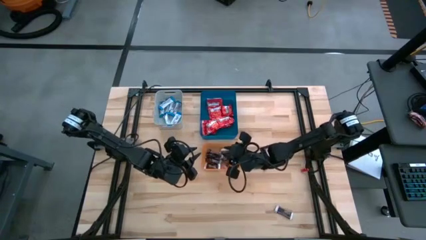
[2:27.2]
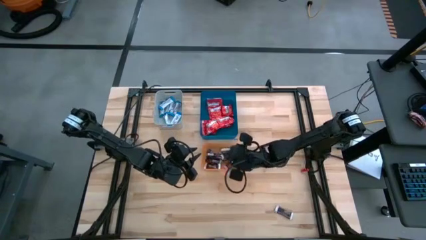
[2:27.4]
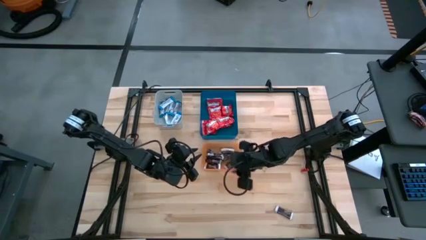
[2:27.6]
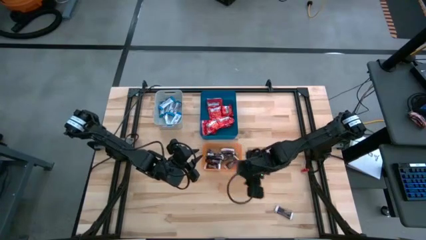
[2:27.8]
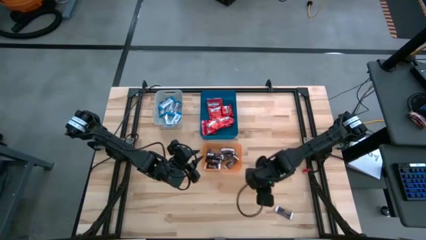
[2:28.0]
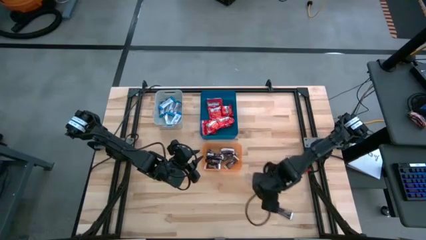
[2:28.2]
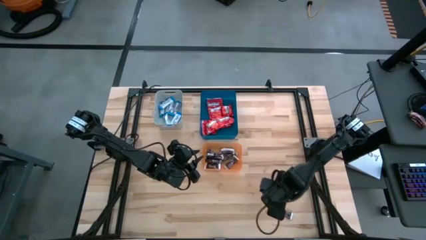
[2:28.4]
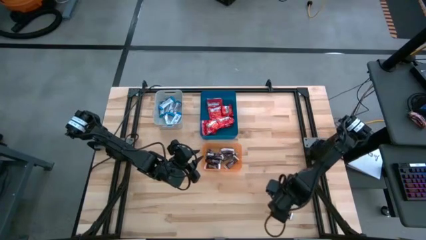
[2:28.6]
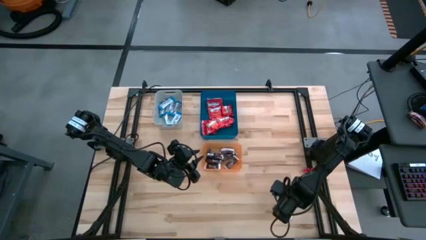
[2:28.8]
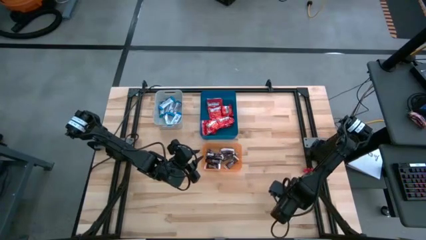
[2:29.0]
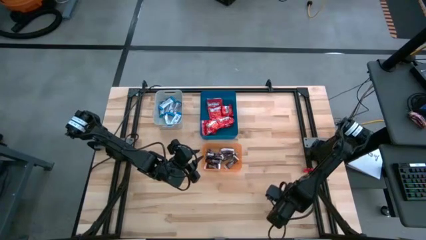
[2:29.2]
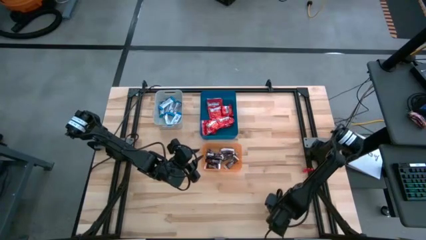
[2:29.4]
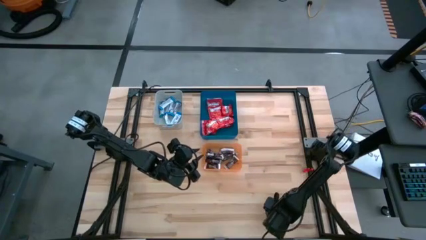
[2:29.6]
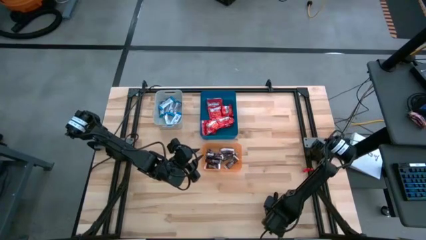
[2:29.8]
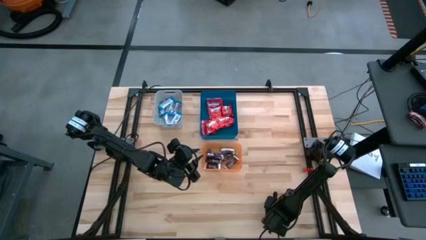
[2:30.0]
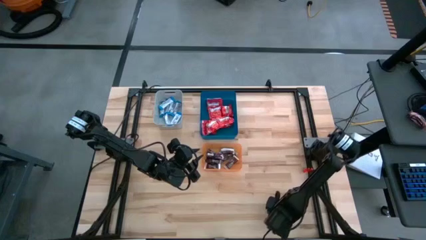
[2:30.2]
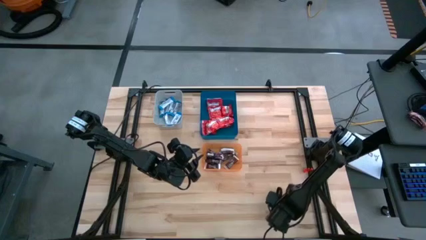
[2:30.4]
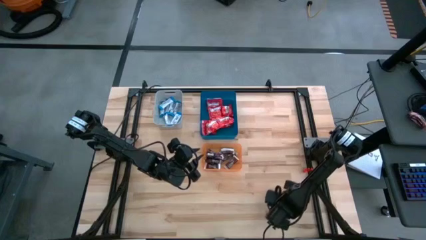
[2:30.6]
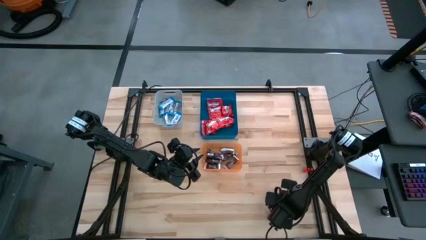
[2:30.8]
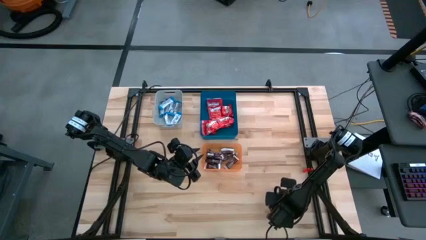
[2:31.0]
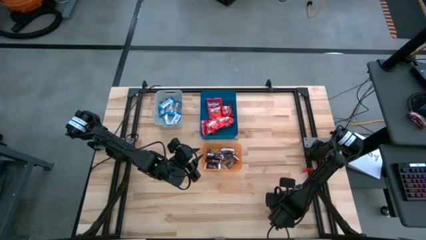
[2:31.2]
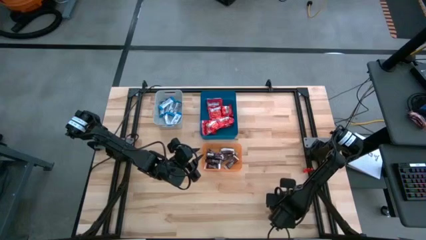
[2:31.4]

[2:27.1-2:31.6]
Task: Sort candy
Put the brown chocolate bar into the orange bin

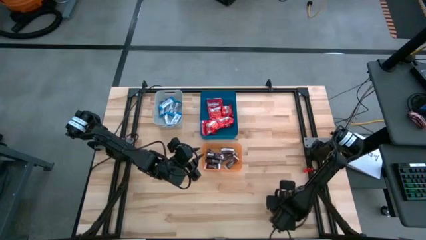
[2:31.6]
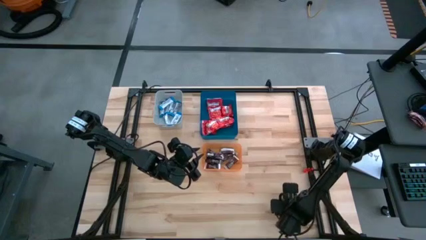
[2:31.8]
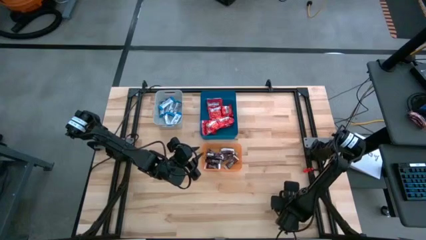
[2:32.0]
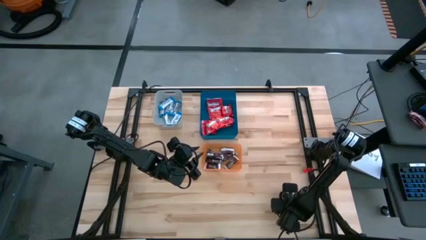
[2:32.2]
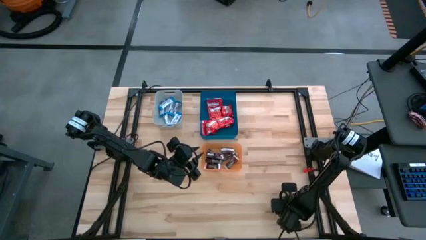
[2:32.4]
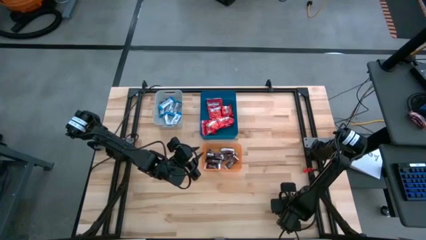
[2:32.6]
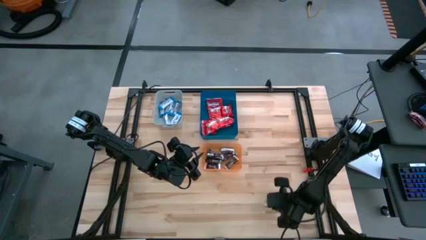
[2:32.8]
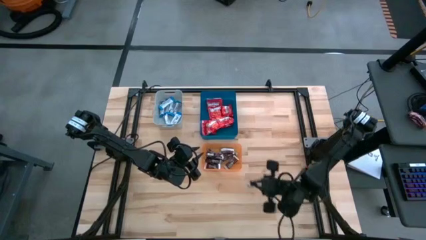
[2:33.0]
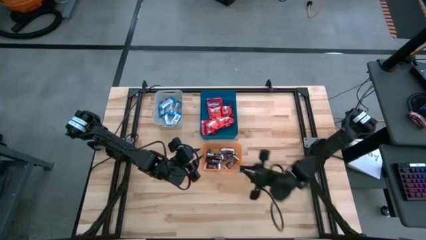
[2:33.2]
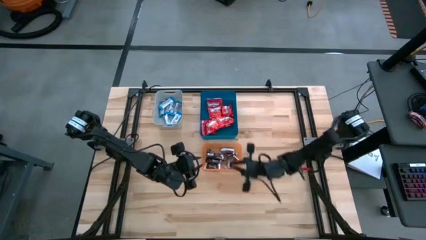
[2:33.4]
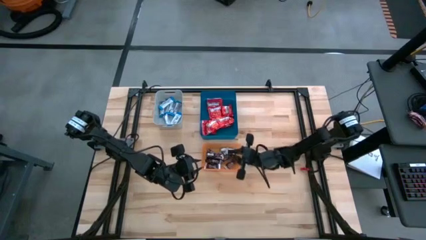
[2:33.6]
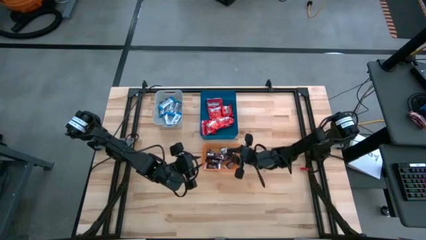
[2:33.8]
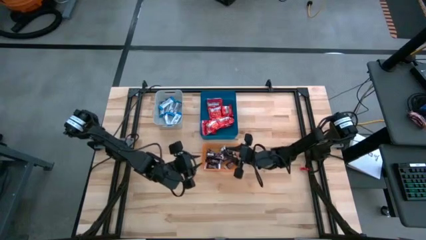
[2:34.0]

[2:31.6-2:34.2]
Put the brown chocolate bar into the orange bin

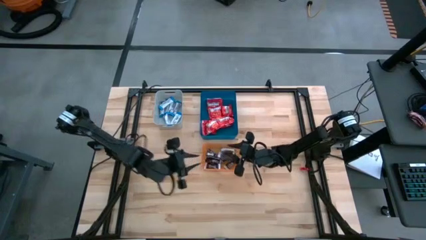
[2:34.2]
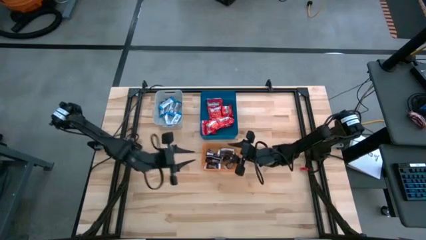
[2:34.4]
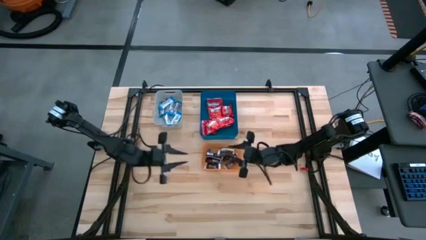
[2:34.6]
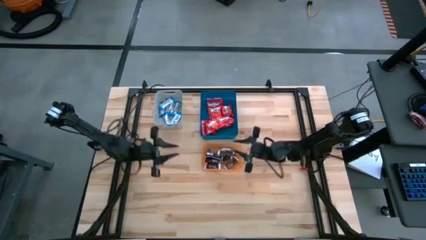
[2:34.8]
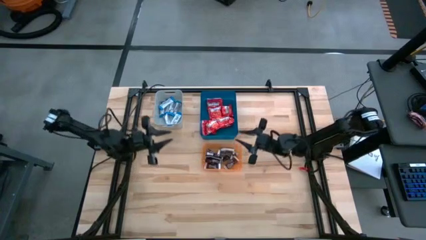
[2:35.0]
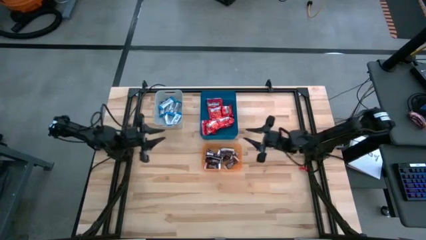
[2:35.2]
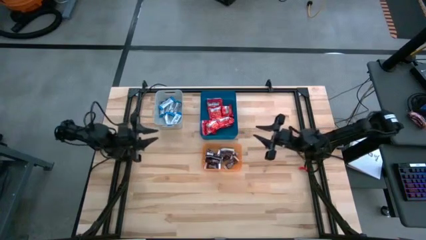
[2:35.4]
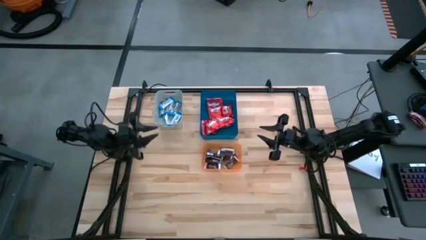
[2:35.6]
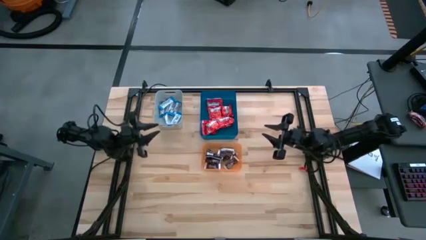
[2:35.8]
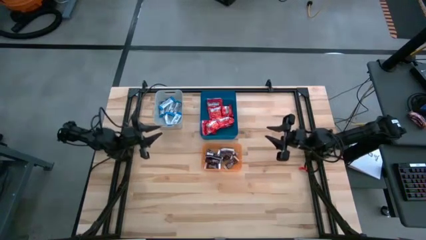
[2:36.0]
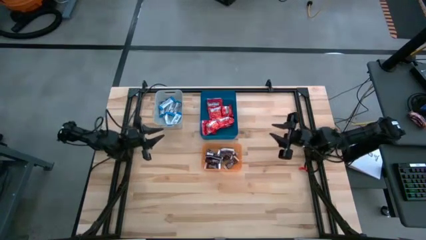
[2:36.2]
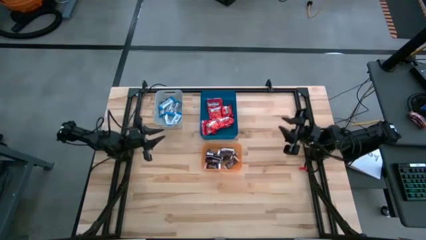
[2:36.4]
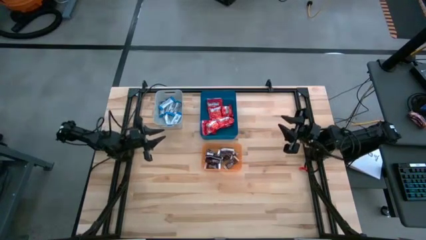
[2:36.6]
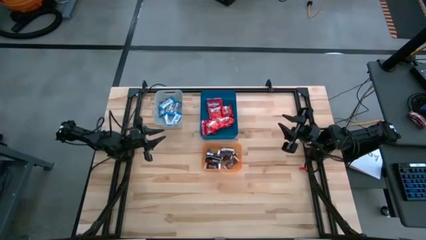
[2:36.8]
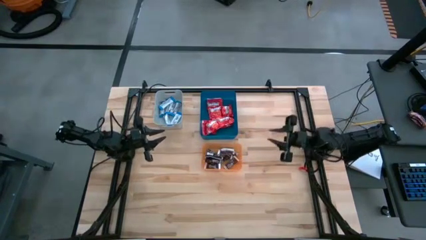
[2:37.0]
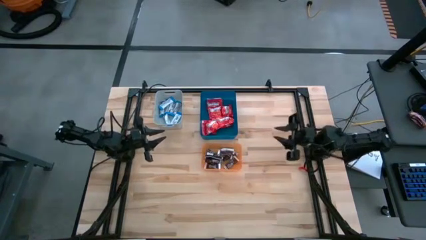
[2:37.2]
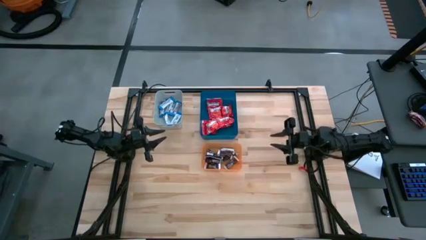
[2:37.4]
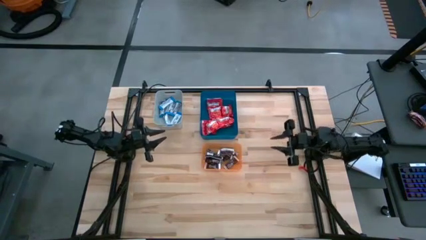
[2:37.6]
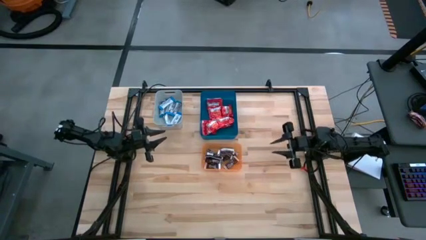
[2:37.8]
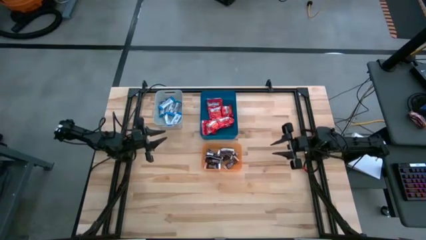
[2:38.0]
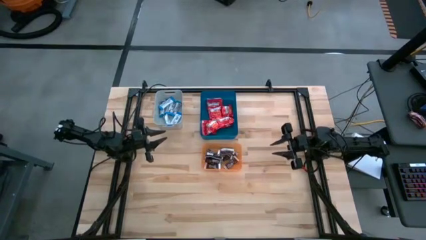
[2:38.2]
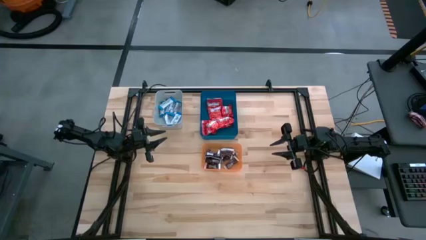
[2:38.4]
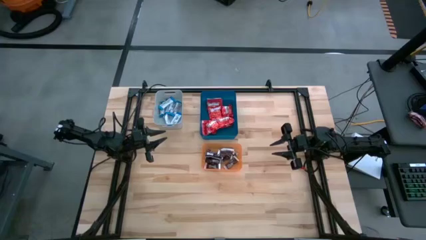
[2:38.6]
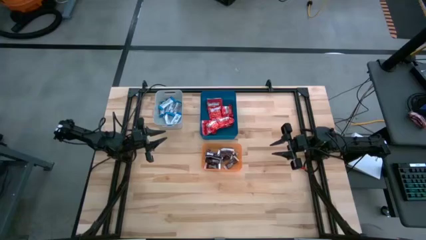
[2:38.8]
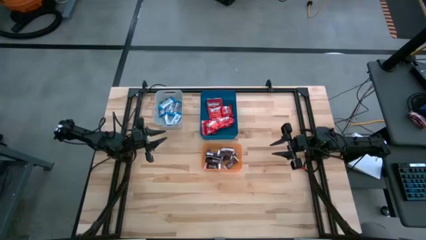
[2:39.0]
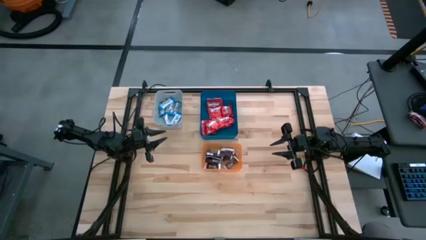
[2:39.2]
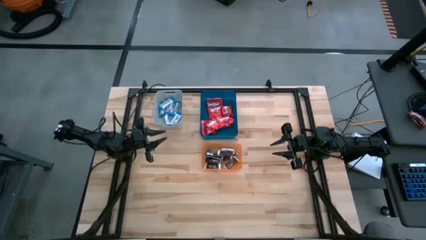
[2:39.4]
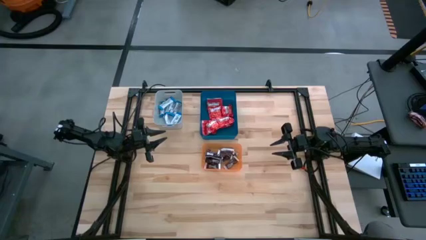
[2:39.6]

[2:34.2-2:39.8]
Return to Home Position
